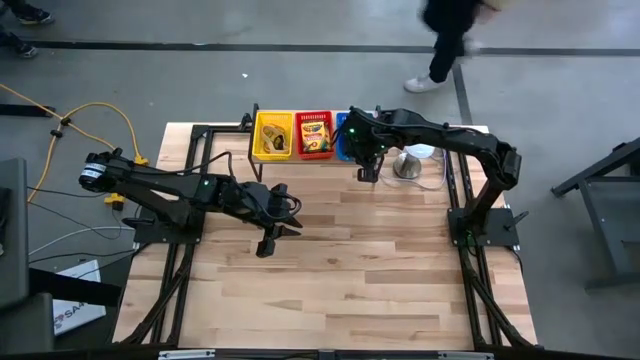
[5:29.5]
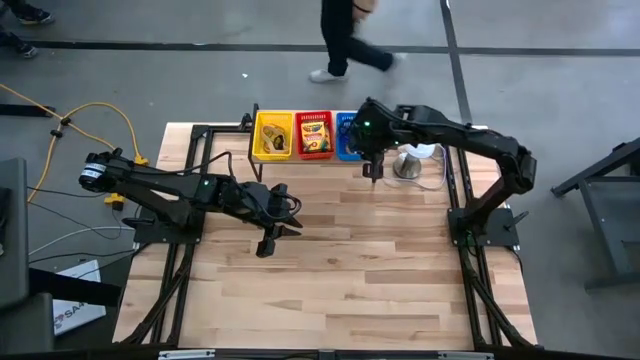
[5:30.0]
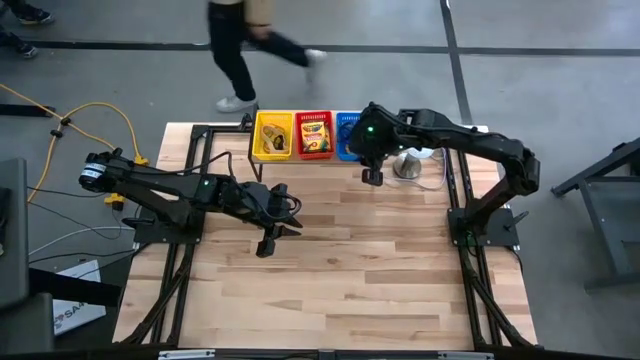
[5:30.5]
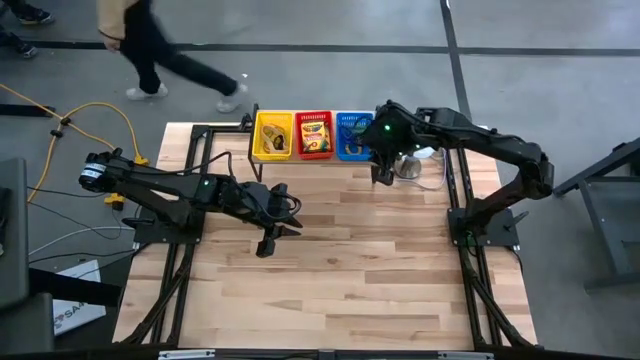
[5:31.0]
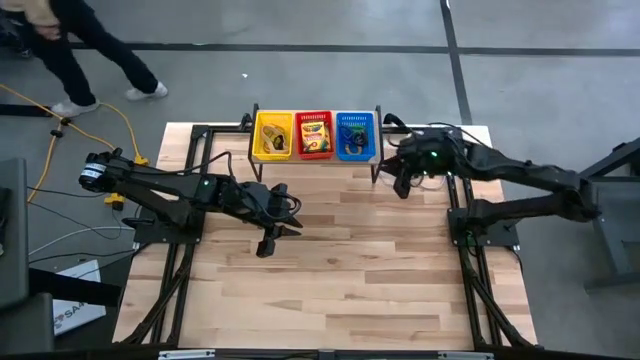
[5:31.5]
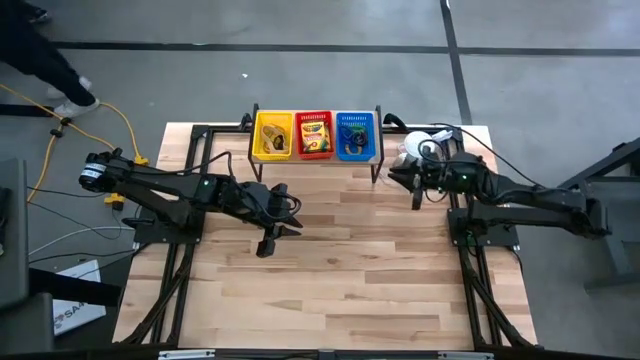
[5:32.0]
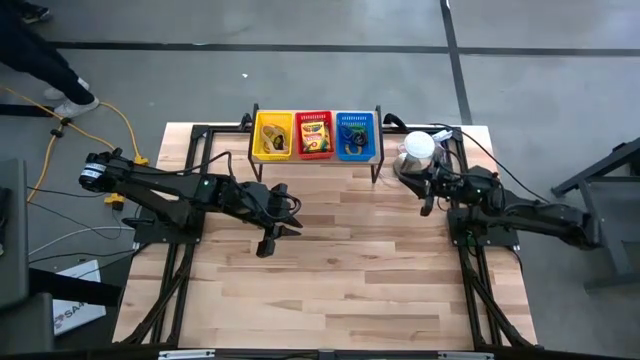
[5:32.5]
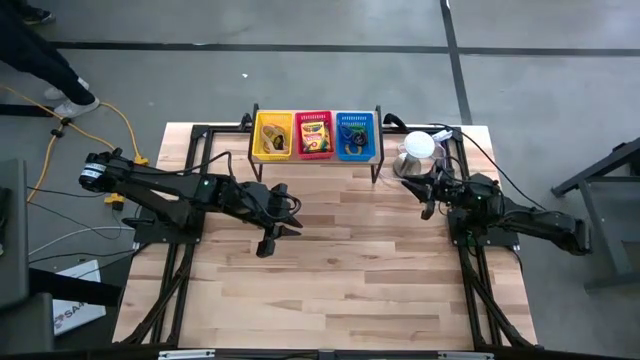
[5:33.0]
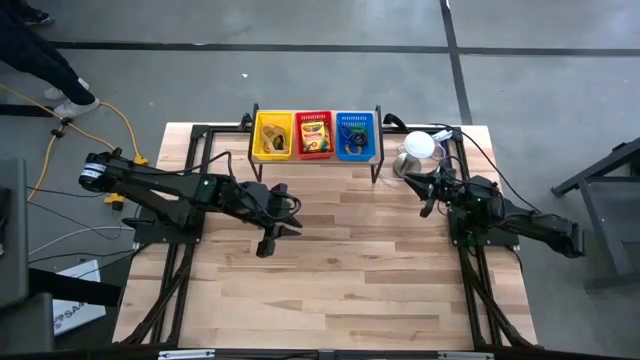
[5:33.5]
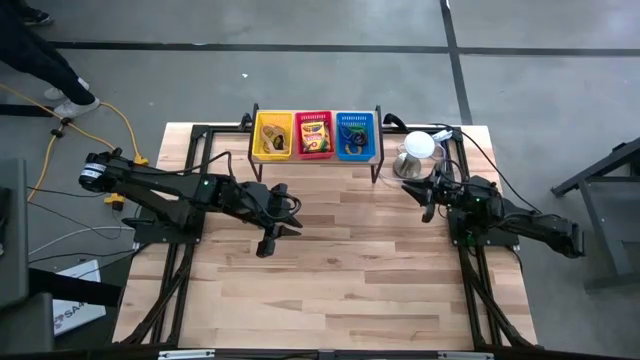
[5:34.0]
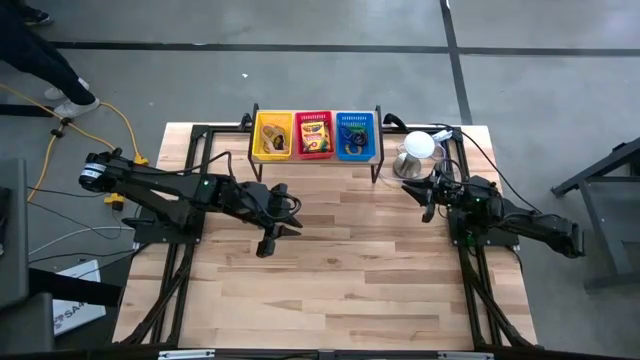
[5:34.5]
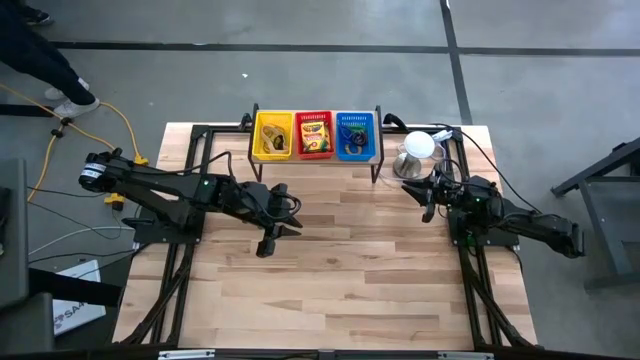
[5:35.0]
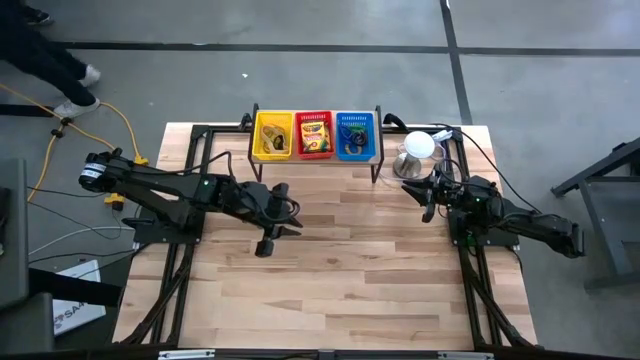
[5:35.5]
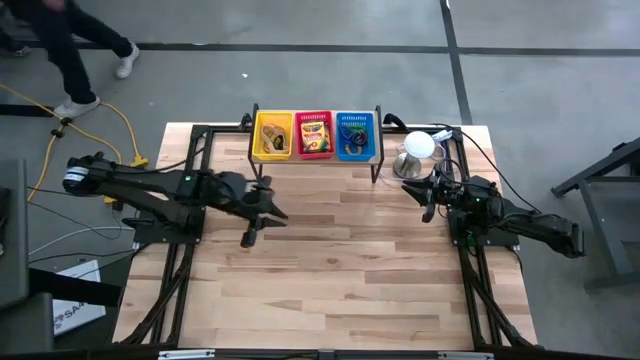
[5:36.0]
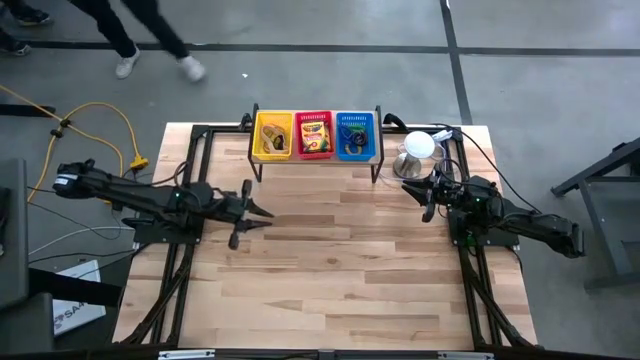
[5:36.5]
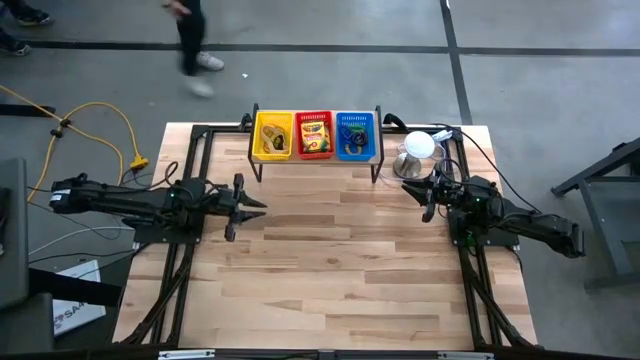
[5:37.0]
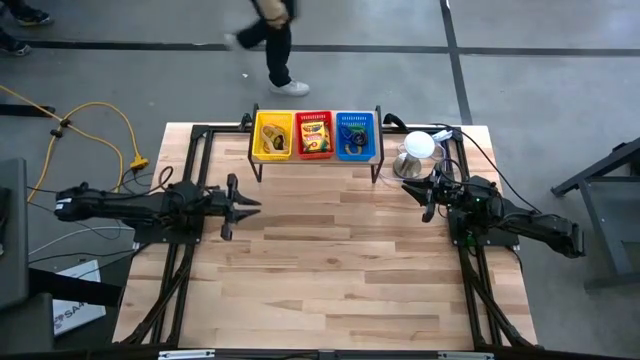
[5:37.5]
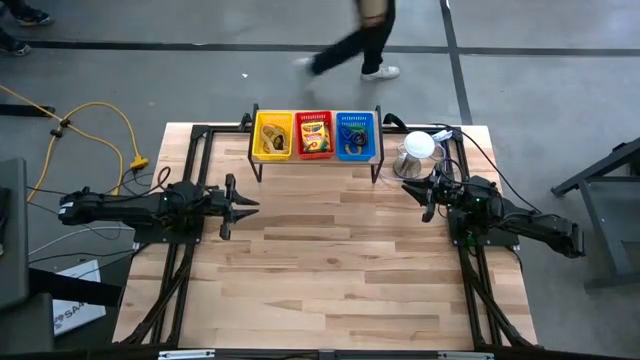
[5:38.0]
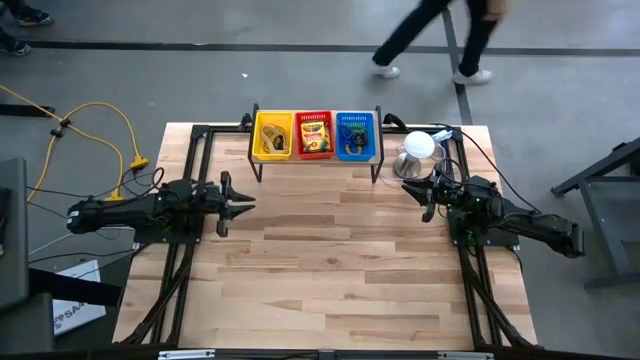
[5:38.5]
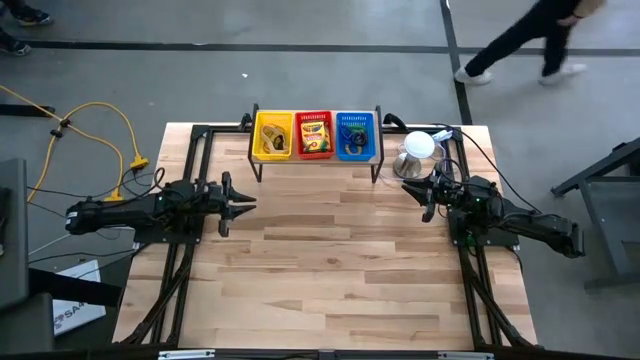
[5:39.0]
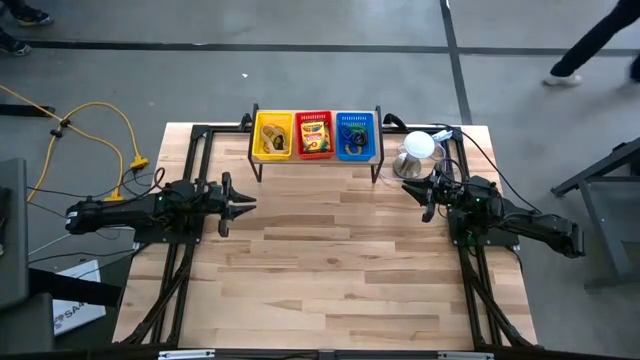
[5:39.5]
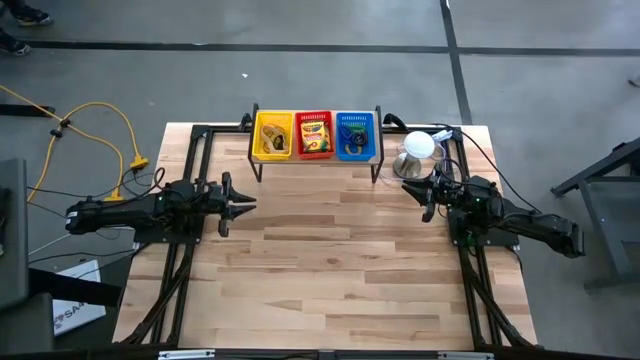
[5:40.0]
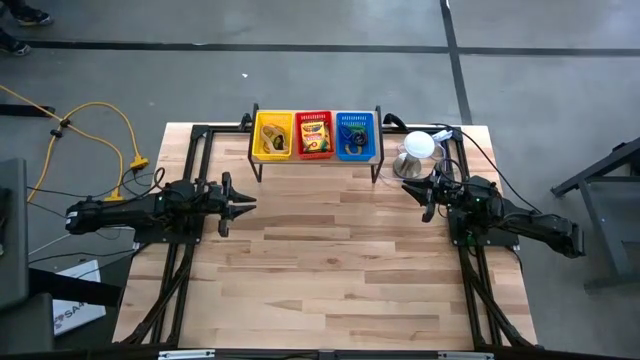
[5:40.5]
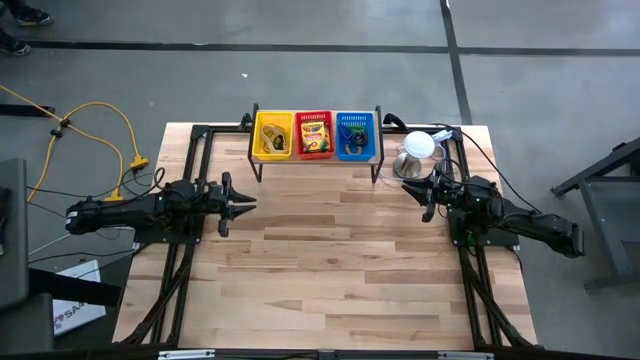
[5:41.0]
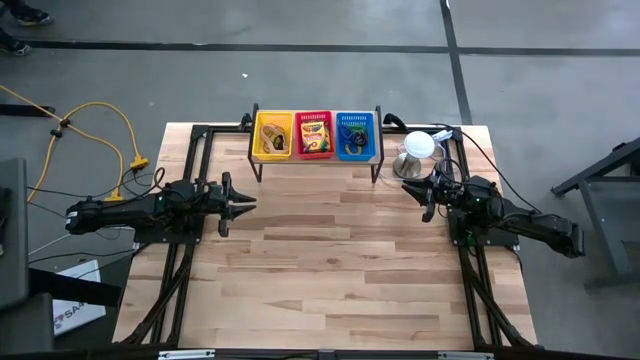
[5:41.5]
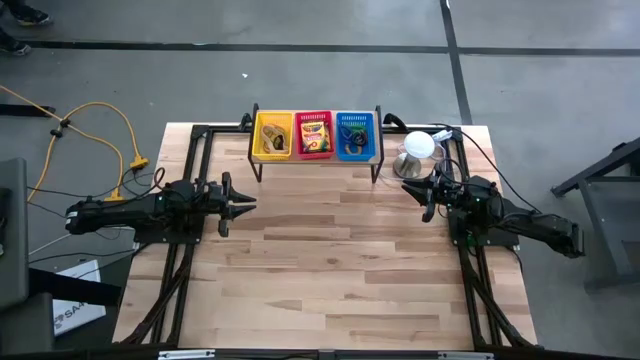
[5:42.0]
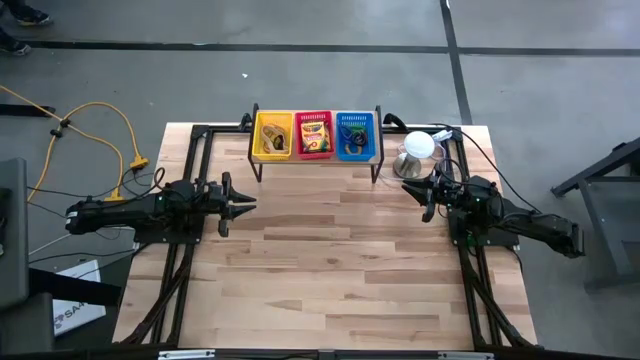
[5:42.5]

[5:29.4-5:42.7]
Task: Pick & Place Office Desk Supplies
Return to Home Position

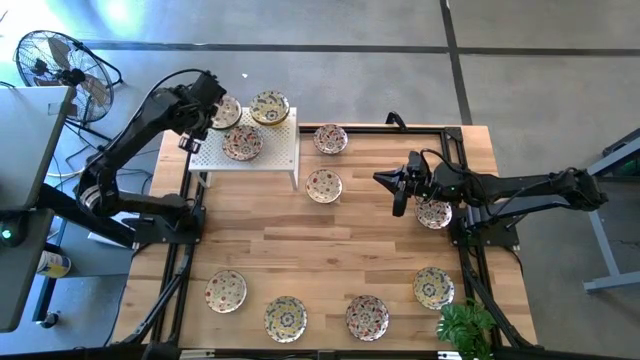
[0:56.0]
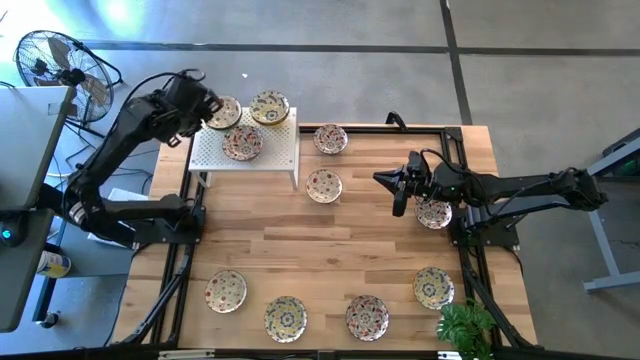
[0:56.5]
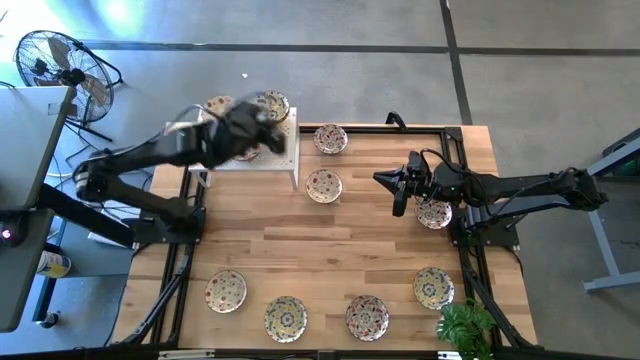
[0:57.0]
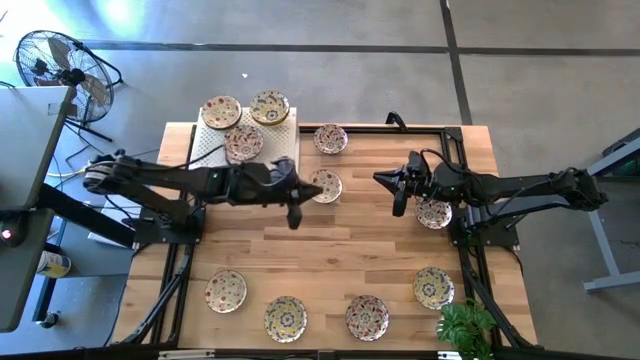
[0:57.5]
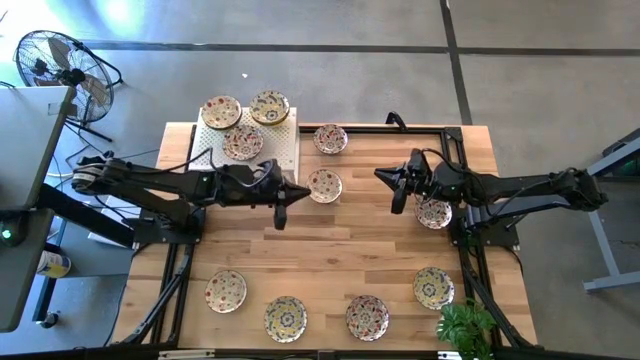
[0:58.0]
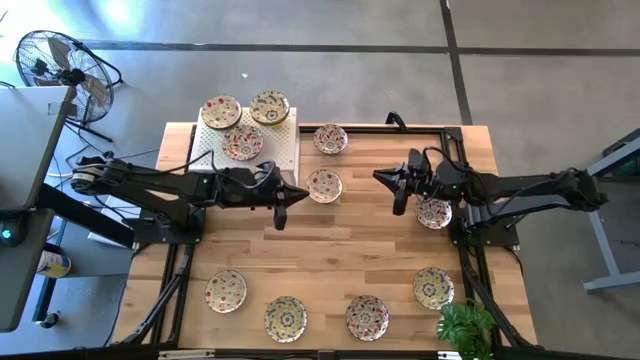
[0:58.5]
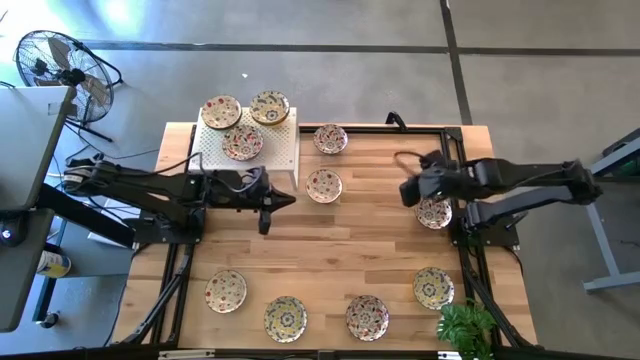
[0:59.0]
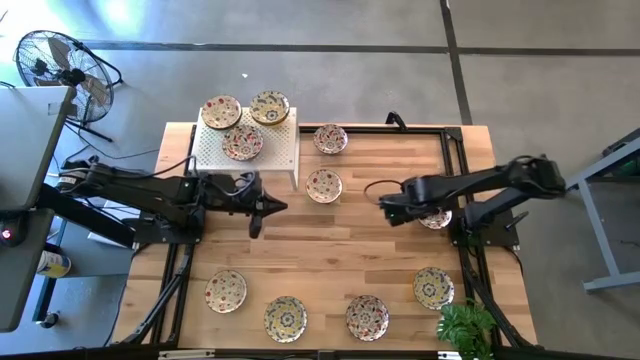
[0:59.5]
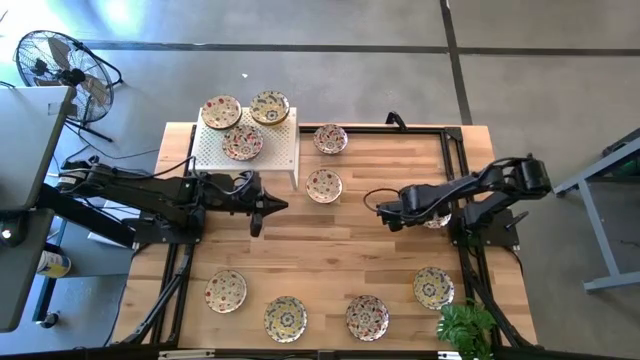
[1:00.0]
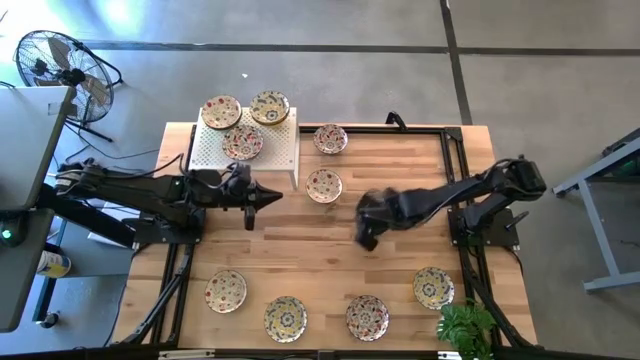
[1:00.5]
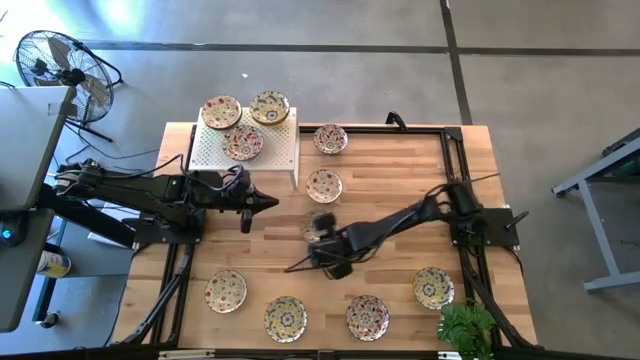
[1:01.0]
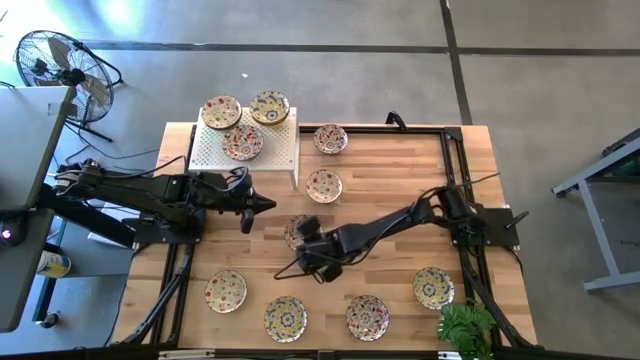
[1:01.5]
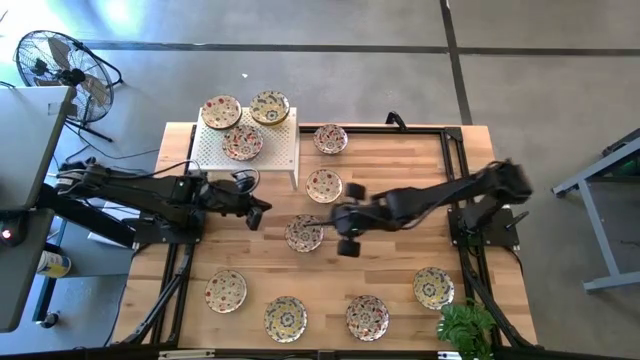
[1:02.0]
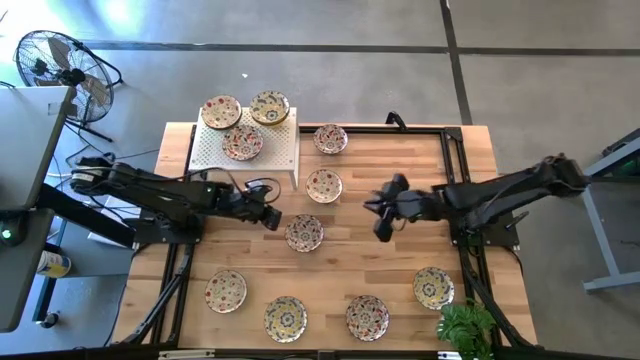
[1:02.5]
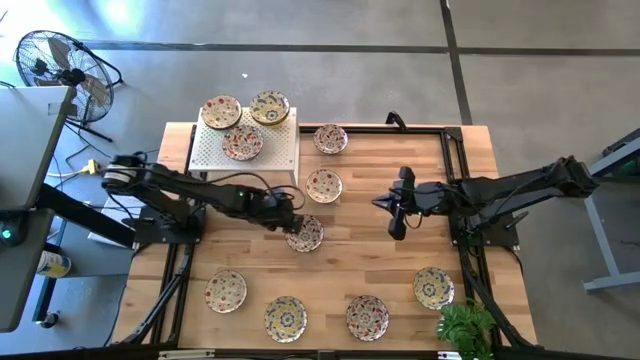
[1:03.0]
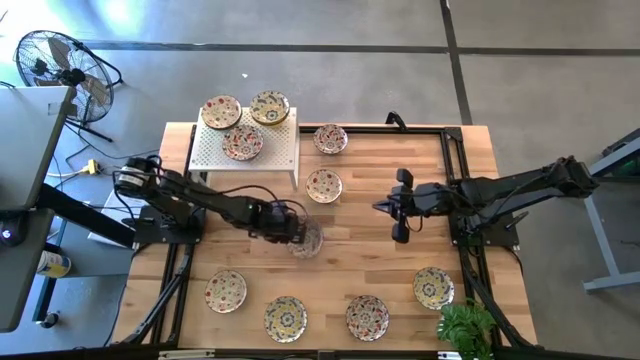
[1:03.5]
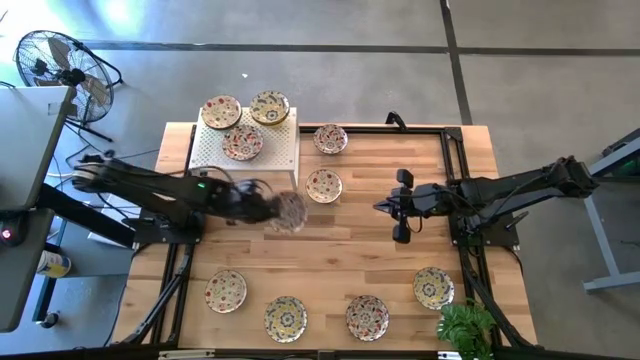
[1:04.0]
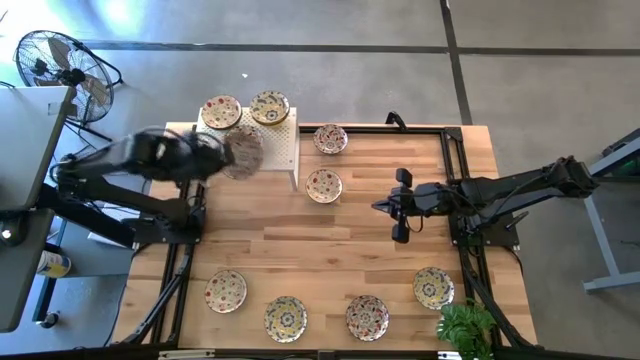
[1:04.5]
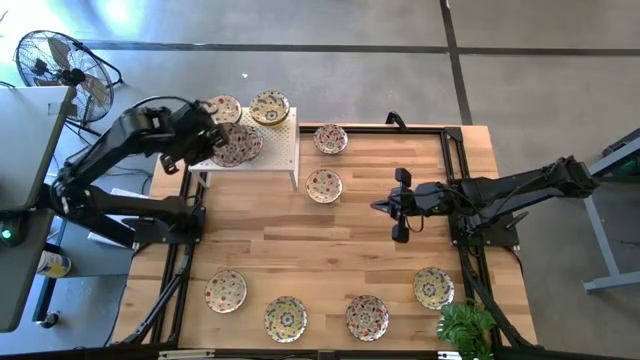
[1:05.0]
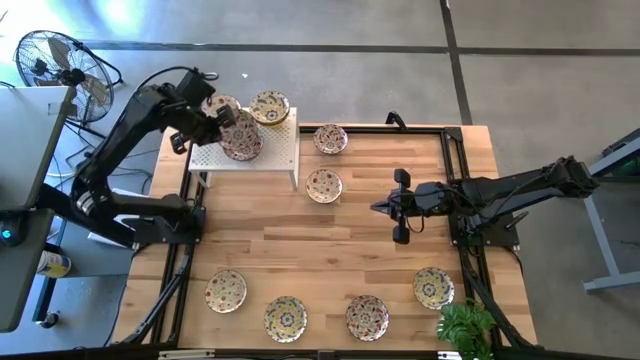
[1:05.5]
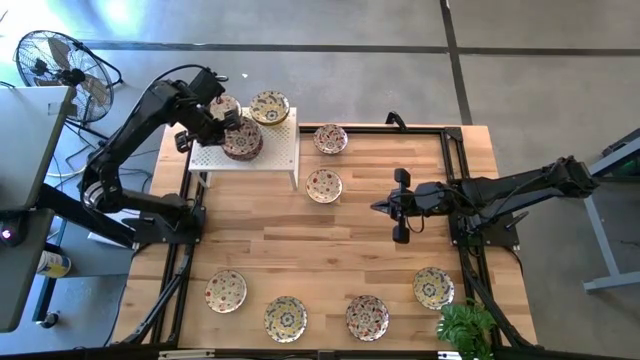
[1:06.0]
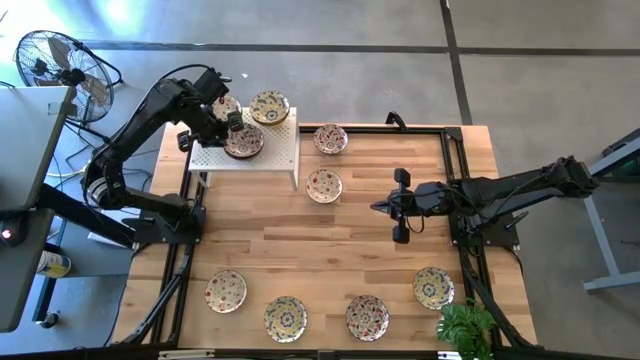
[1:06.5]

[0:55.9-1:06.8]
Task: Pick & Place Mini bowls
Stack the orange patterned bowl on the orange patterned bowl on the shelf
